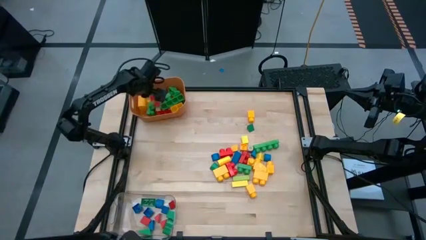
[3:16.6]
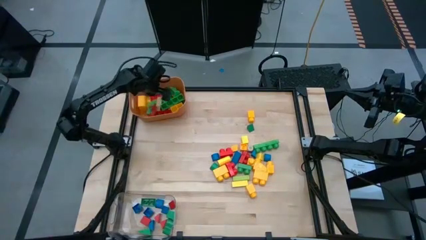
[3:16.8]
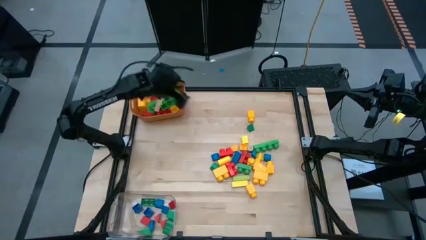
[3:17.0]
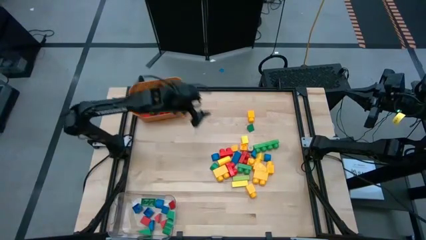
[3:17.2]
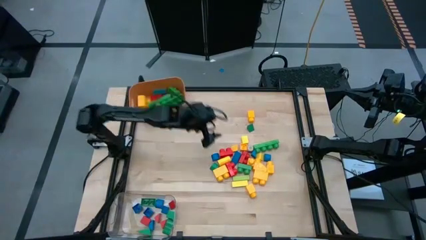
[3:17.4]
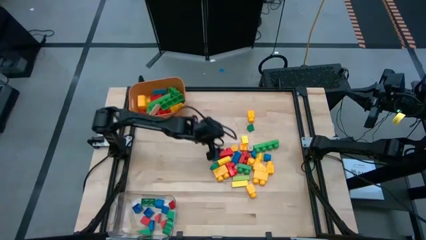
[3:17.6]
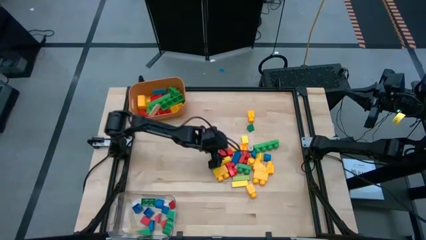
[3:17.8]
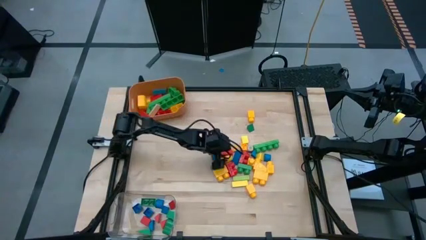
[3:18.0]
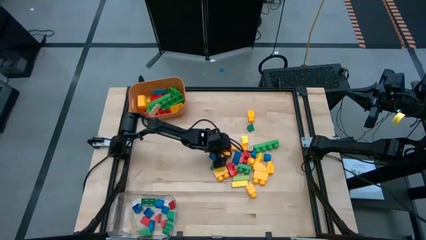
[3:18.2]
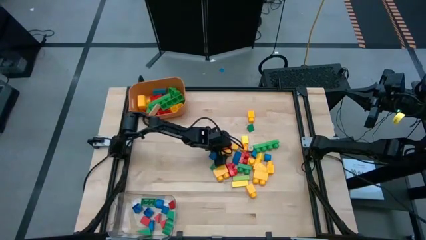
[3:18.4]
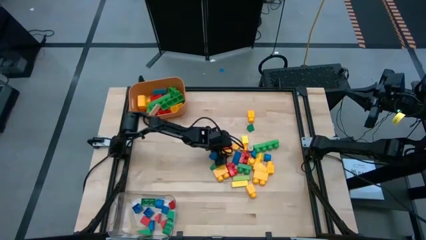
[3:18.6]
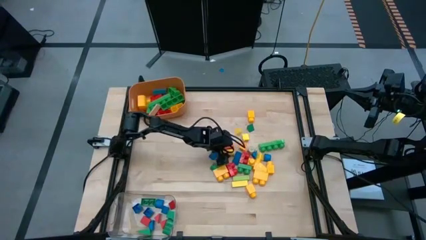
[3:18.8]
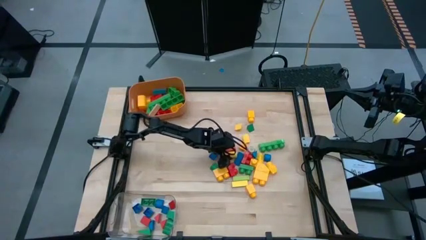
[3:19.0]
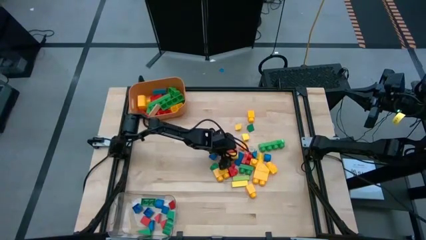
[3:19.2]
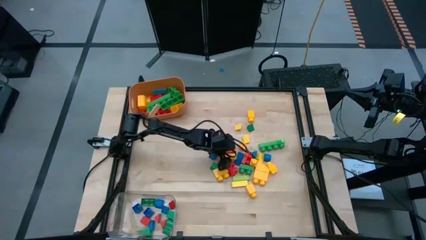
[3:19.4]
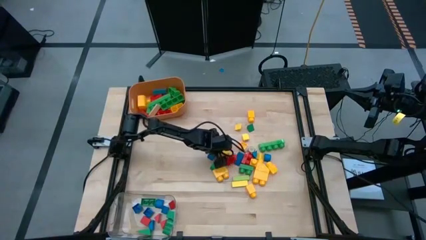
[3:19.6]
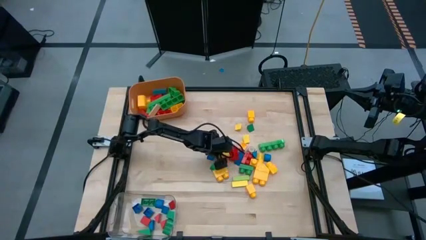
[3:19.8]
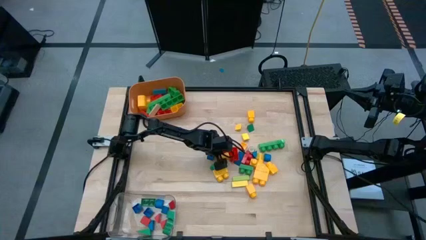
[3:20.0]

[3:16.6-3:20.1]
Task: Sort blocks by size
Put the big red game piece into the orange bin

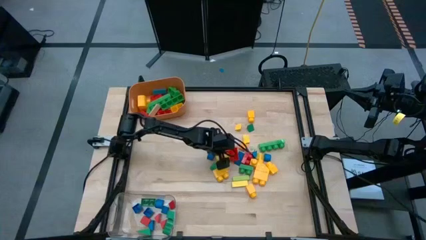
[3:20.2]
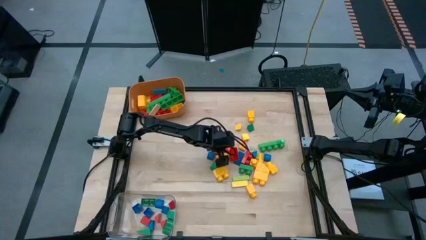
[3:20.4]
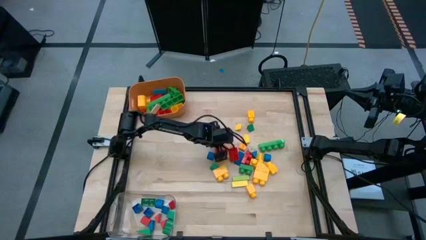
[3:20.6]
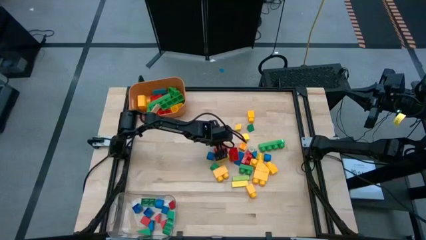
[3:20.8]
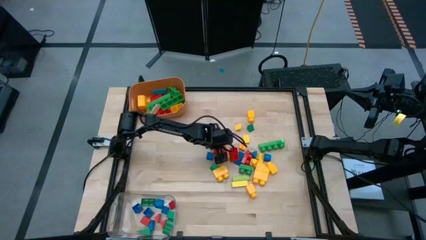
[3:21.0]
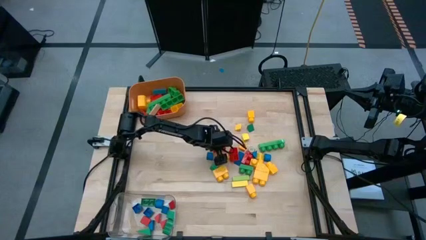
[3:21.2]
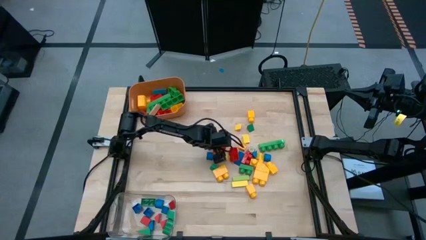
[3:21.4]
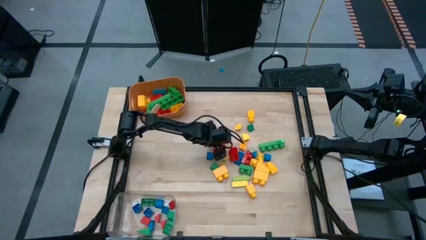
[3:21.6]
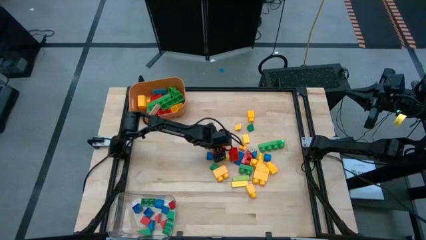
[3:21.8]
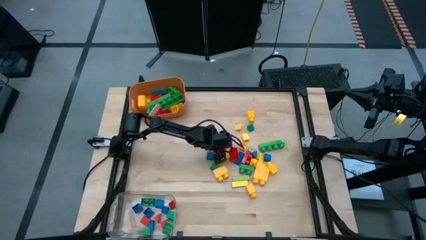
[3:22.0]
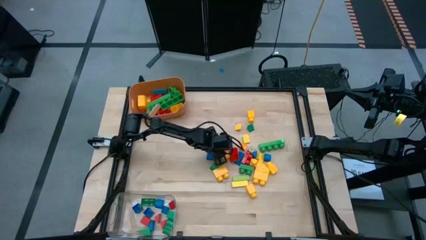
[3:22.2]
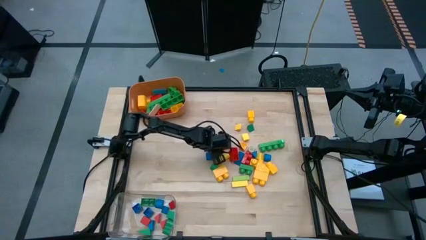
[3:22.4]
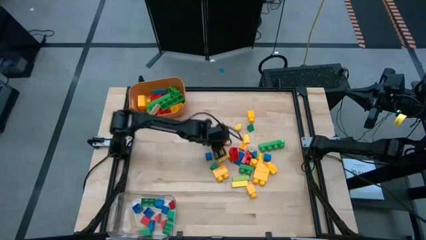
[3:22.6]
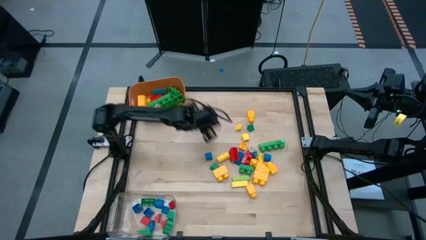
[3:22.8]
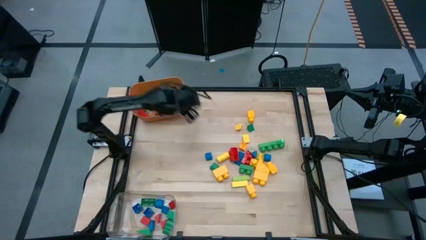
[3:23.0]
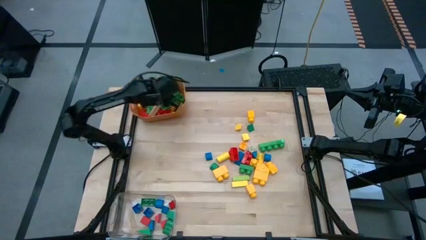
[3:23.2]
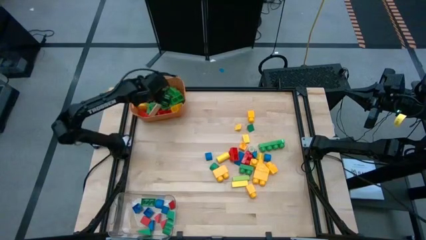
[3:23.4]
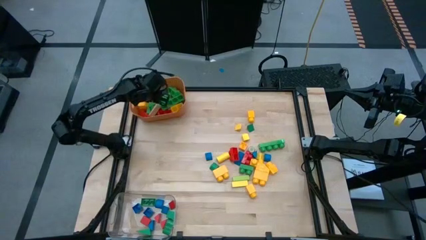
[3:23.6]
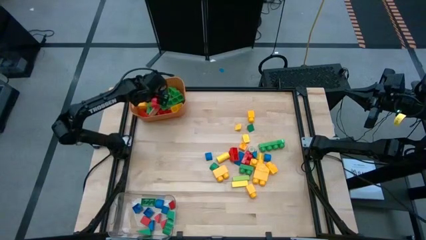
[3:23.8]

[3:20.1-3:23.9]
Put the big red game piece into the orange bin

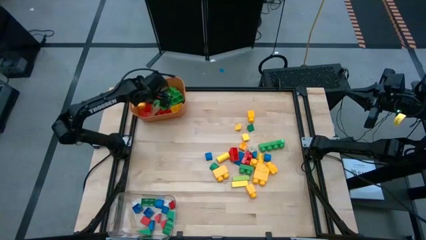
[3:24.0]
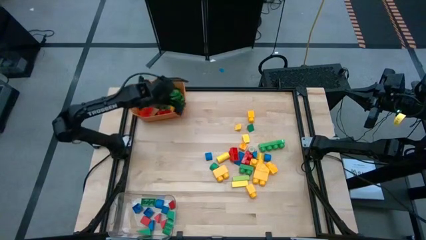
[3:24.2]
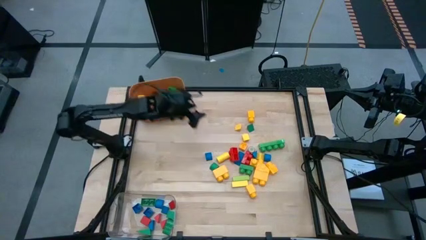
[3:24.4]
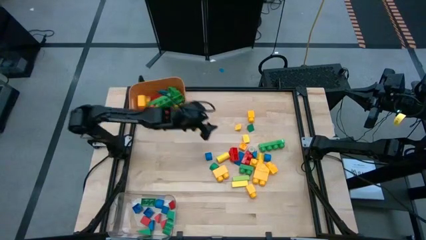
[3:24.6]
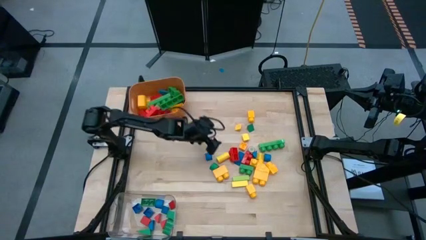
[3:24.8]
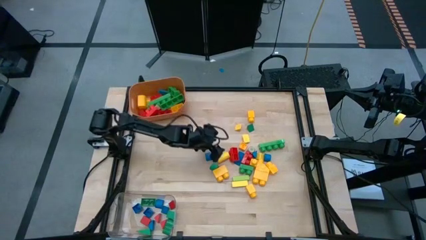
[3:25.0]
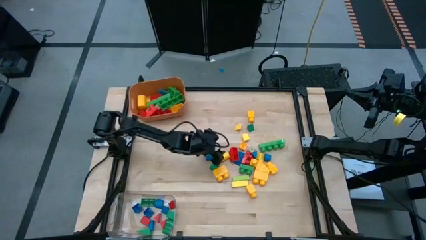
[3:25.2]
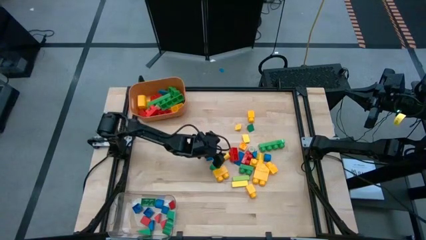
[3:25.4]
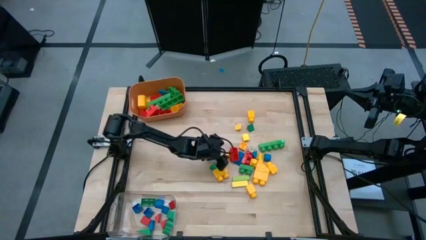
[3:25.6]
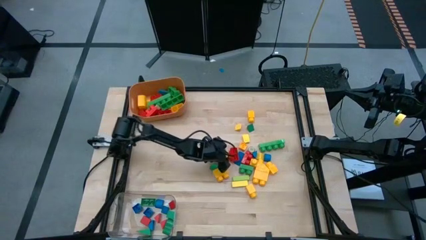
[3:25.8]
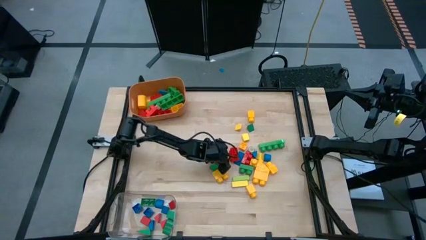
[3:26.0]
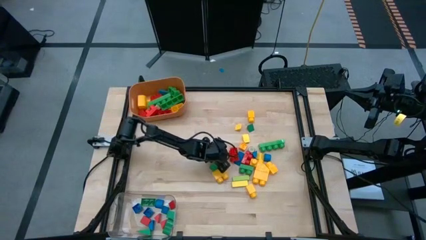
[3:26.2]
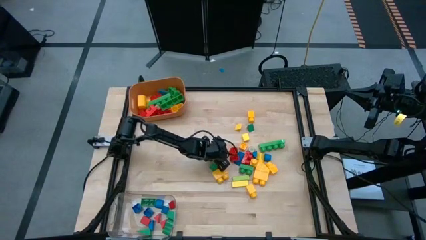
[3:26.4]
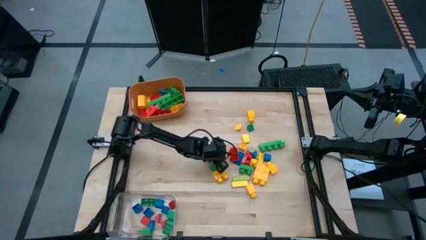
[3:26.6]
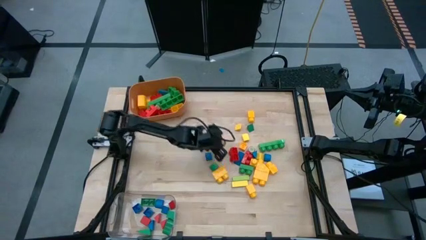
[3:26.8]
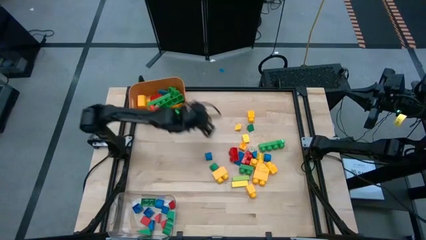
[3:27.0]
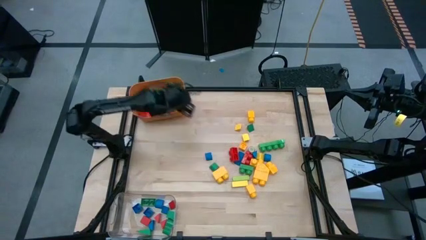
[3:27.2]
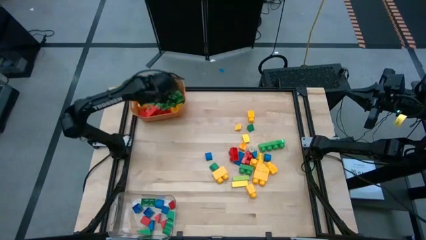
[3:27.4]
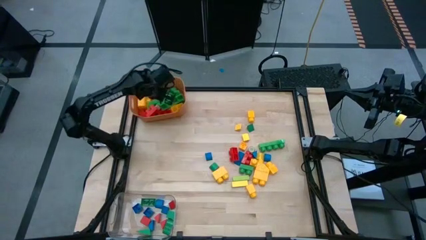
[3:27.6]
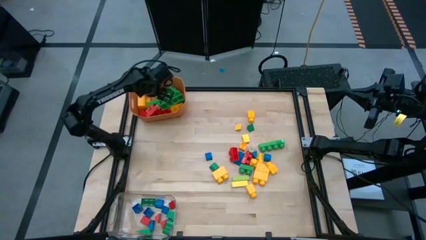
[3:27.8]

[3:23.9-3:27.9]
Put the big yellow block into the orange bin

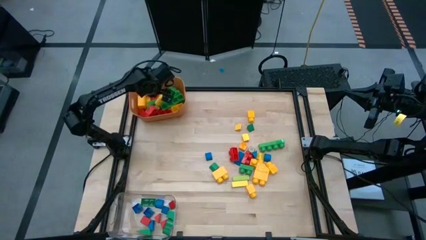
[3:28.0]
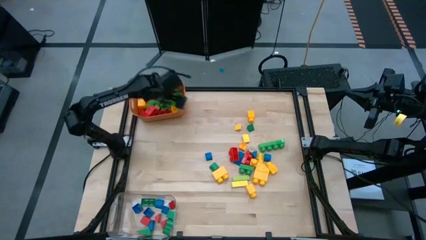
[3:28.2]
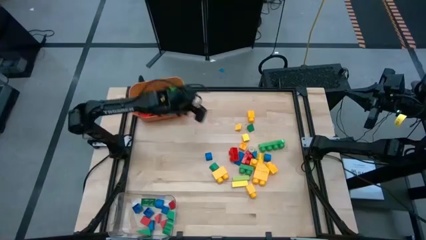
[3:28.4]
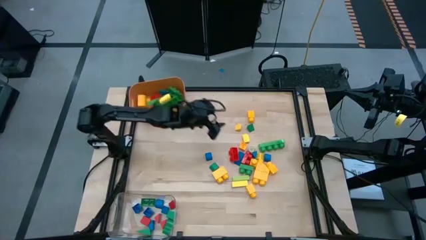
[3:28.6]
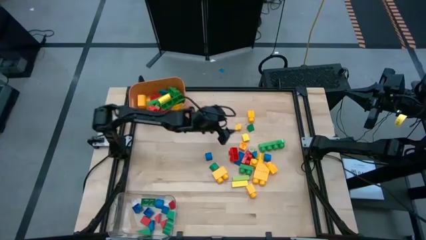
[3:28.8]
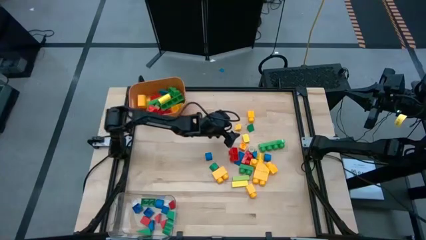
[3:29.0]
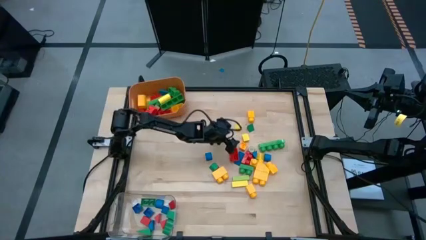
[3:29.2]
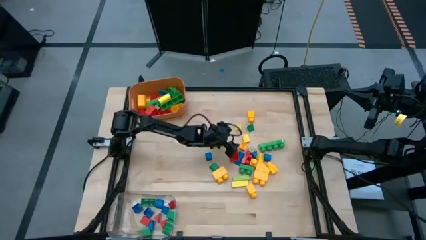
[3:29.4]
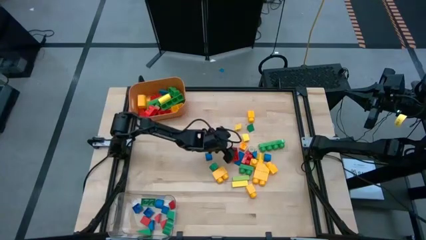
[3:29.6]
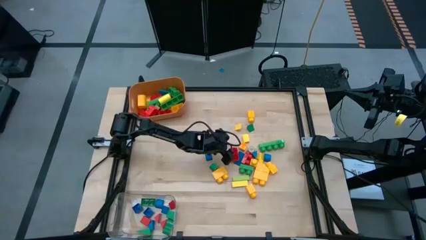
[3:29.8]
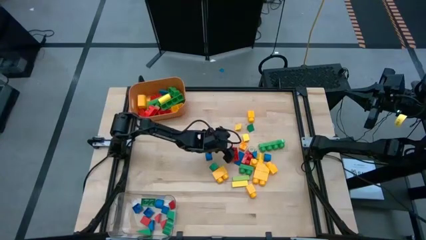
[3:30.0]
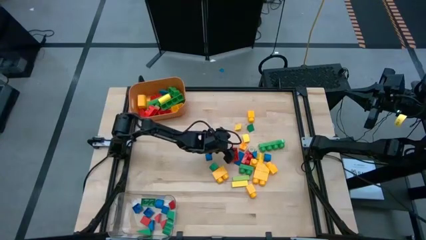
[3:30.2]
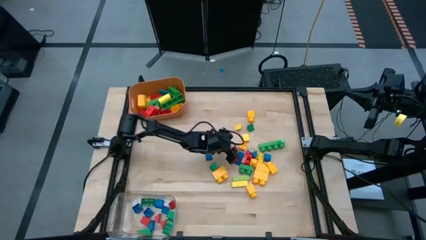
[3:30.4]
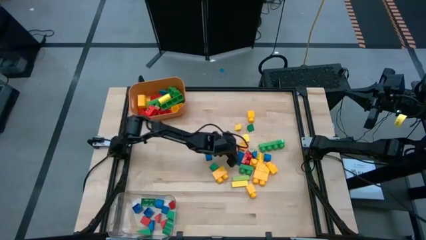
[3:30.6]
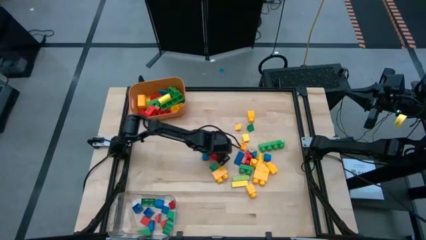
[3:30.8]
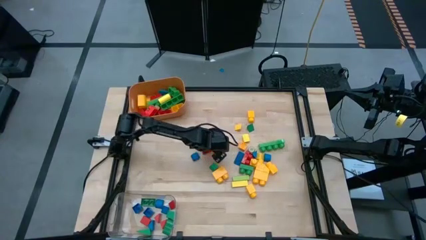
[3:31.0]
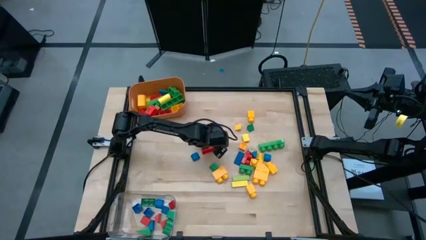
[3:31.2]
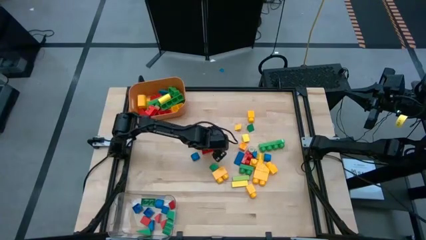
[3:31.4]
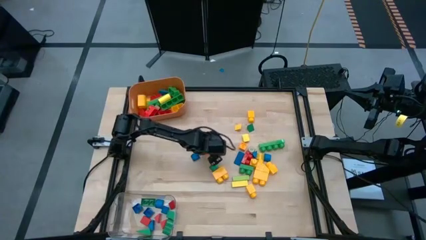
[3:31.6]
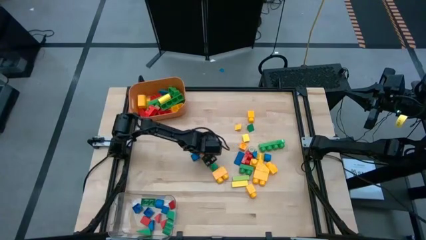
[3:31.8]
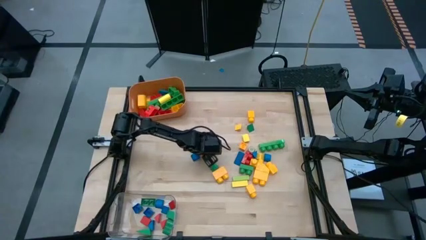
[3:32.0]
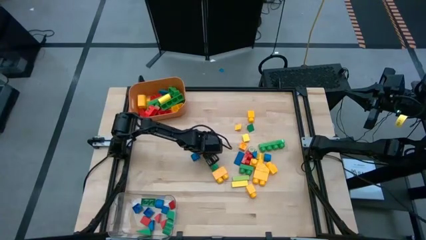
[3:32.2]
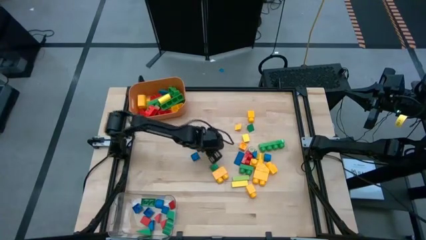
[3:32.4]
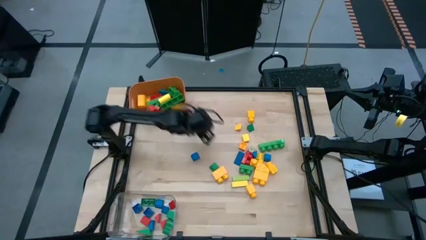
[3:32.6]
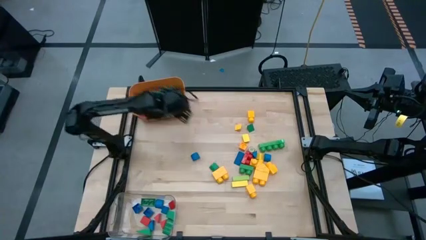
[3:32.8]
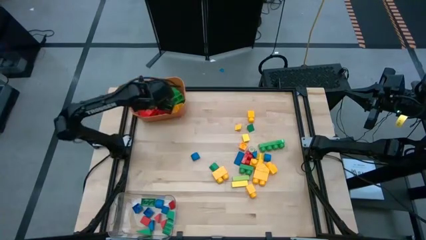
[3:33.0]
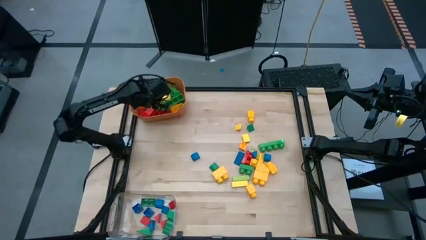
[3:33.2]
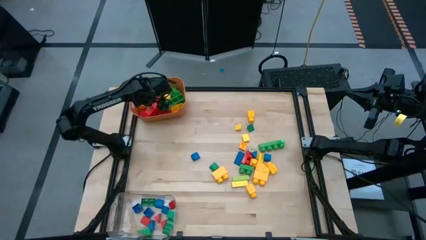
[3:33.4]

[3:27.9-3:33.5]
Put the big red game piece into the orange bin
